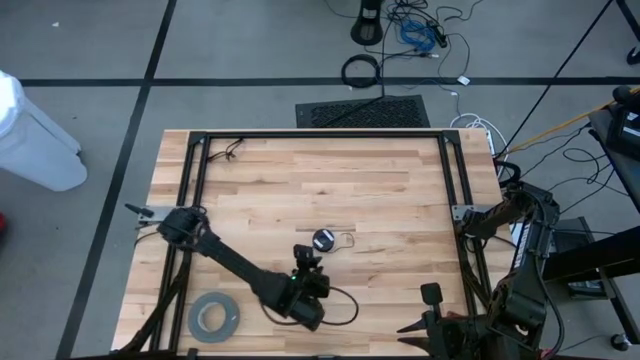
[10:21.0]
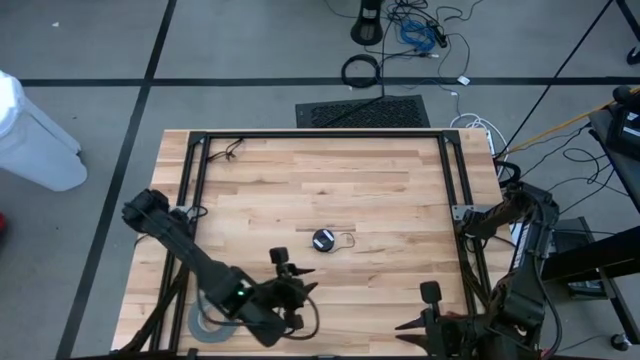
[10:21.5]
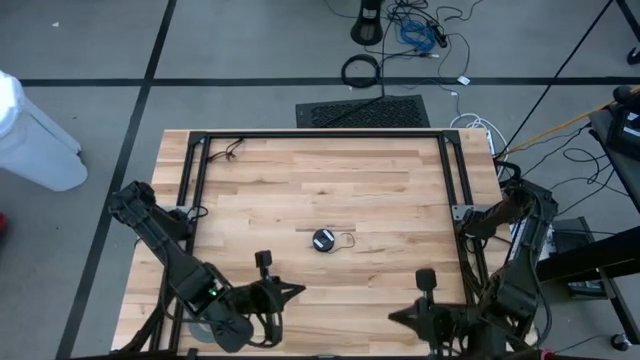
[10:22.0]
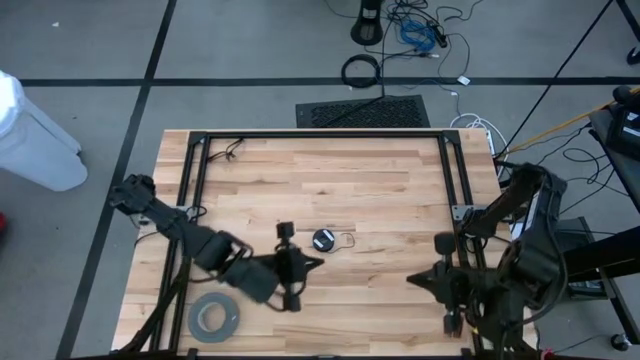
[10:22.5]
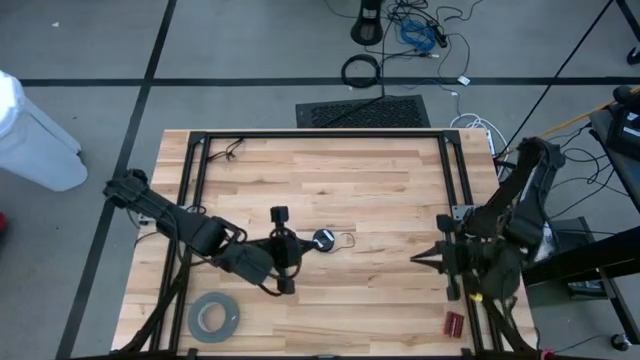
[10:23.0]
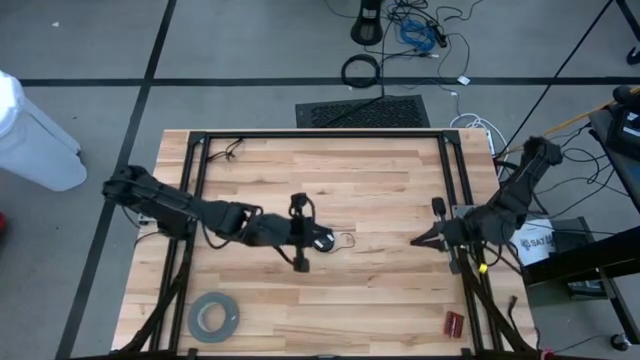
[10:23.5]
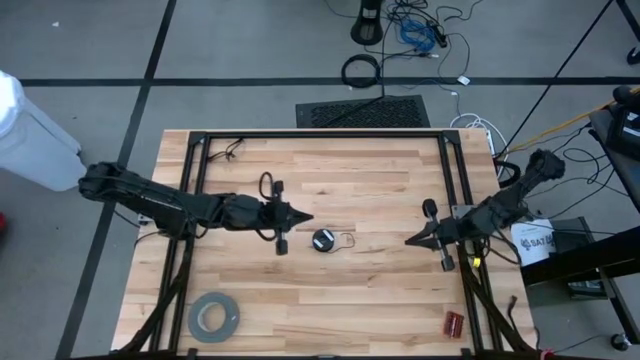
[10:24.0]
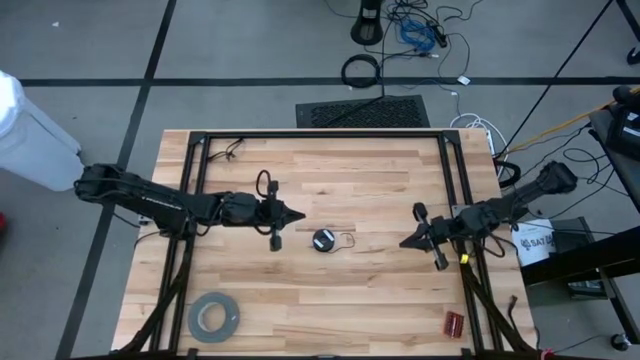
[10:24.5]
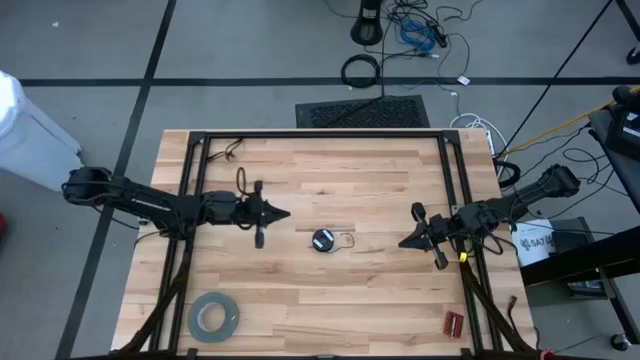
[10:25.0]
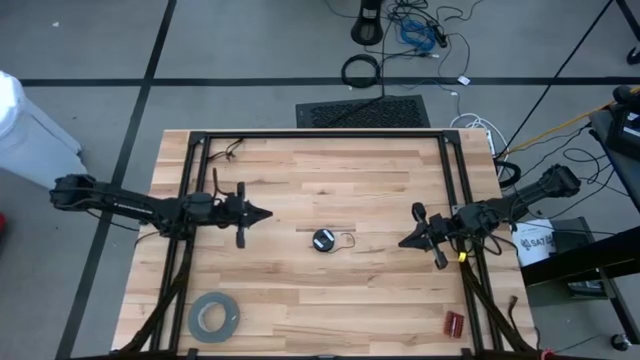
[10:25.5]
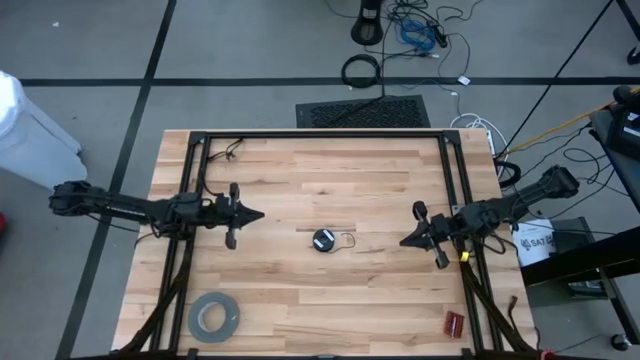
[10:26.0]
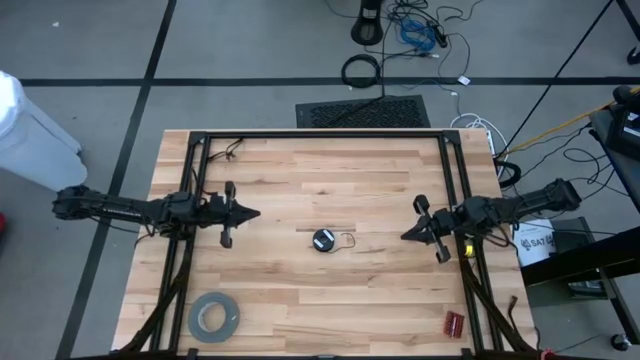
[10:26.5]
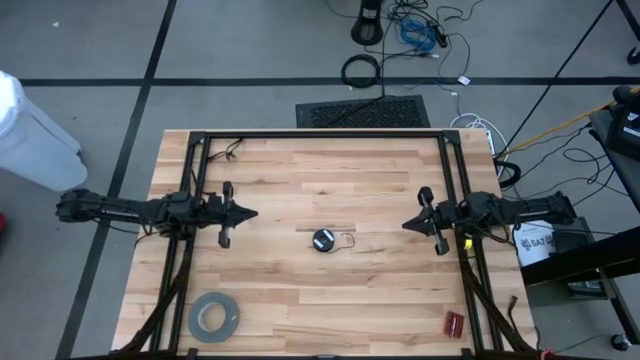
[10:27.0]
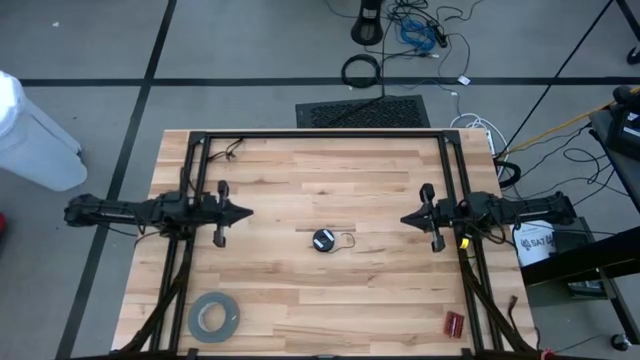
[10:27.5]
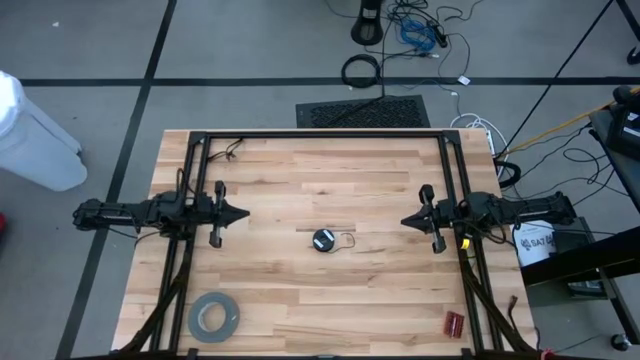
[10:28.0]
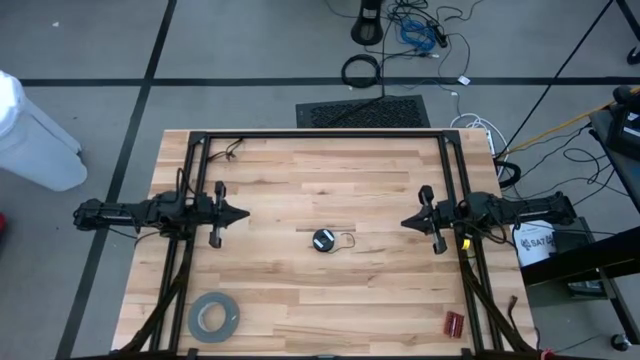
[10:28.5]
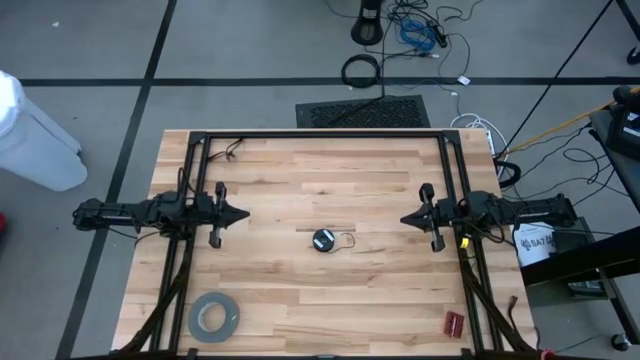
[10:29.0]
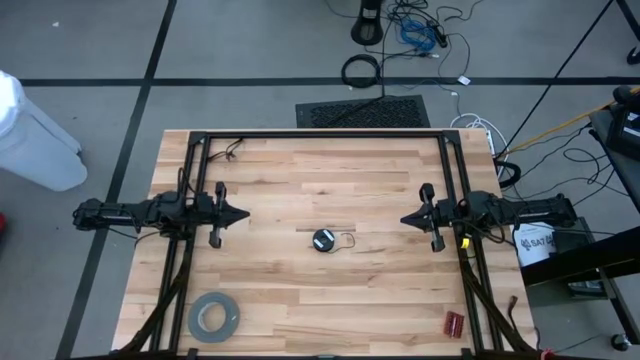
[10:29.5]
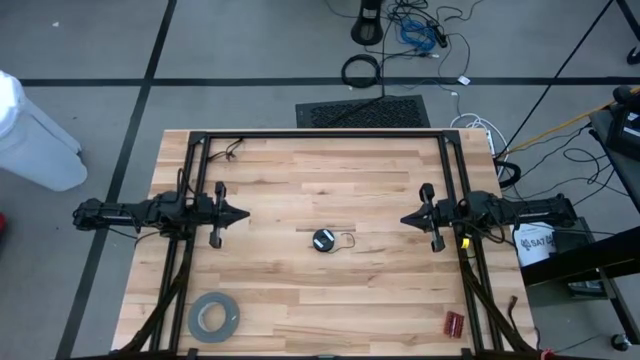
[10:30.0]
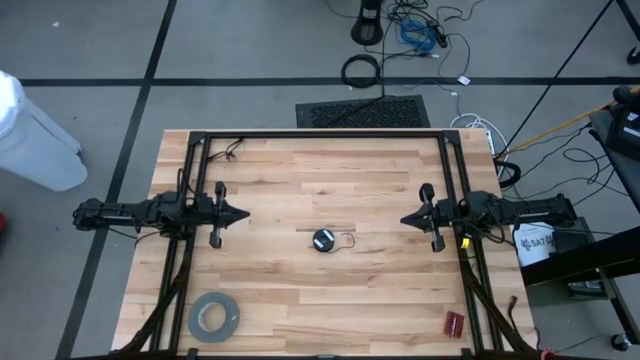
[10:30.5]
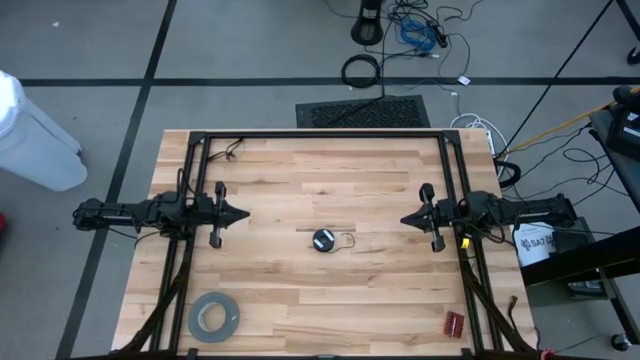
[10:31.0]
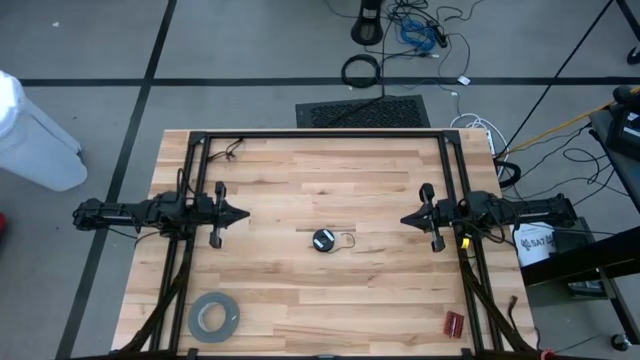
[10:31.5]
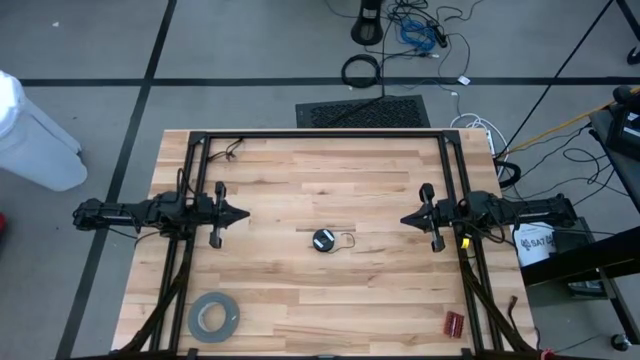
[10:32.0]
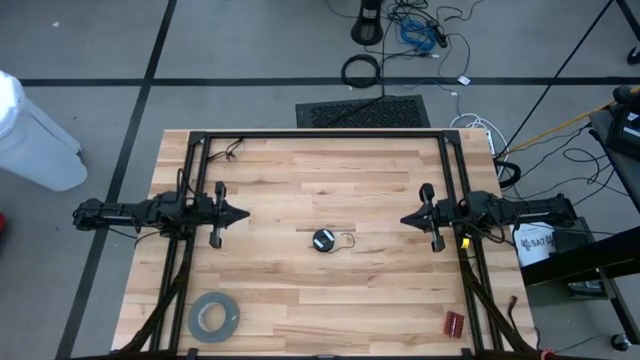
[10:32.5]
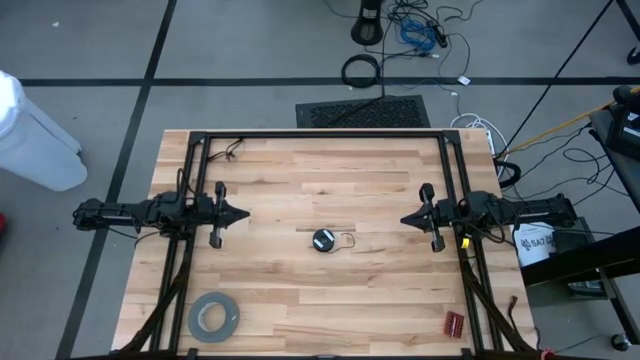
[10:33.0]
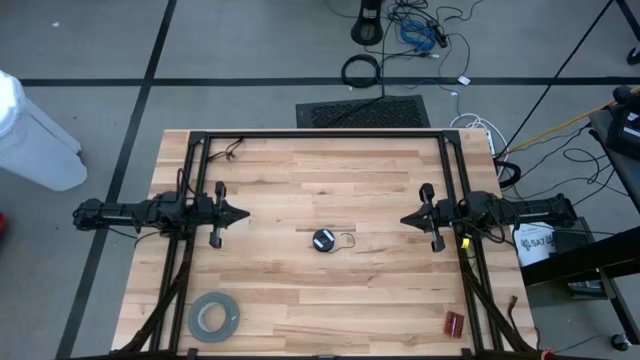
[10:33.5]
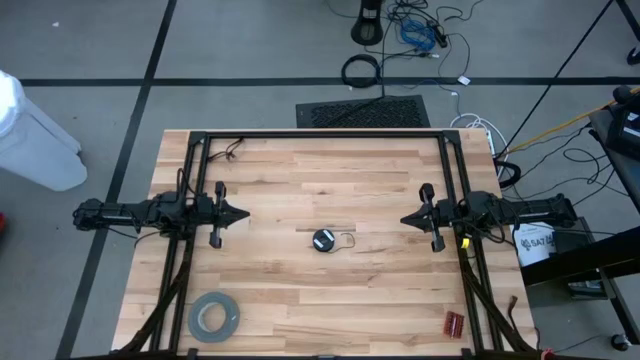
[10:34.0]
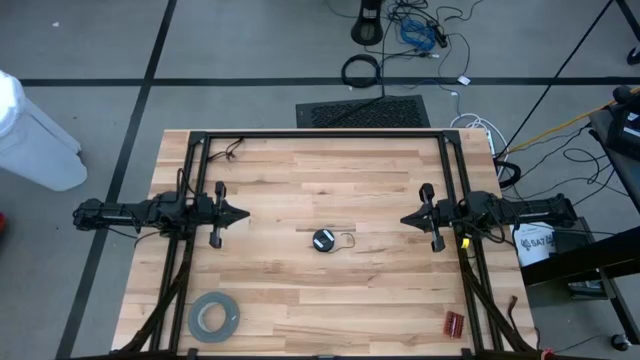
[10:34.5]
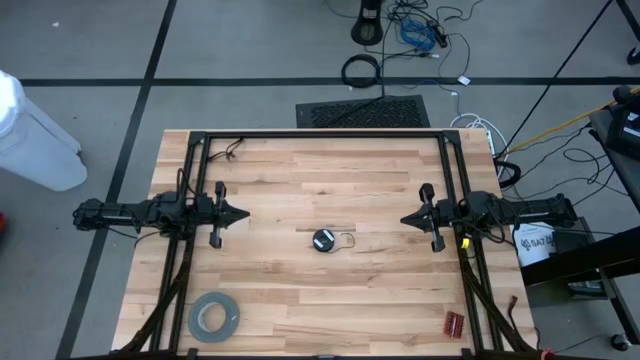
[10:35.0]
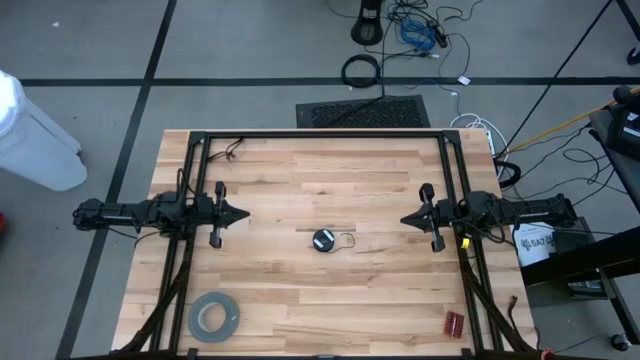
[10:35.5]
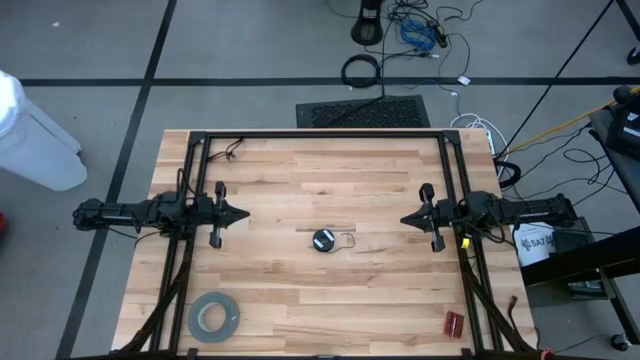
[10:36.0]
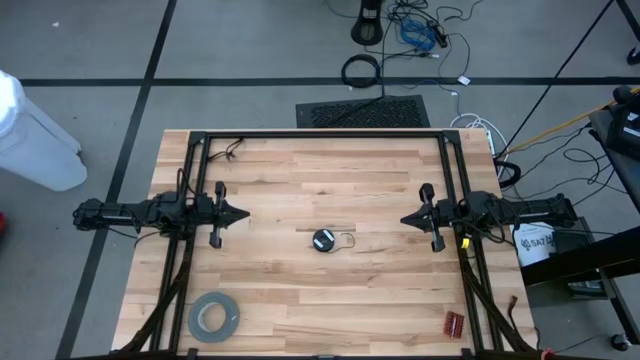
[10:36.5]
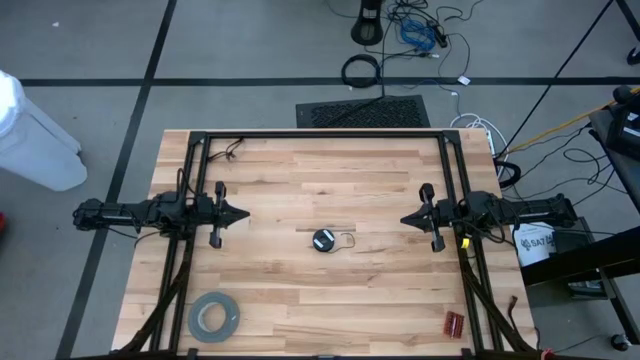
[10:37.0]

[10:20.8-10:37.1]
Task: Coil cords
Return to Home Position

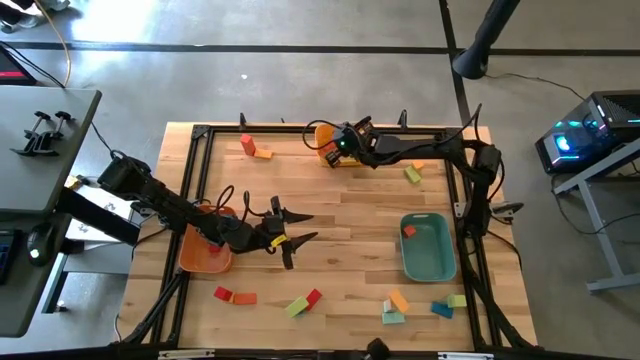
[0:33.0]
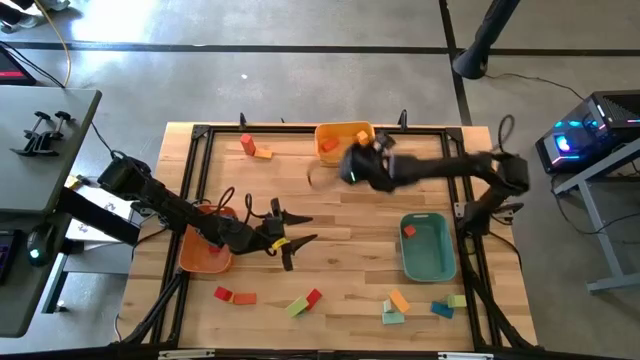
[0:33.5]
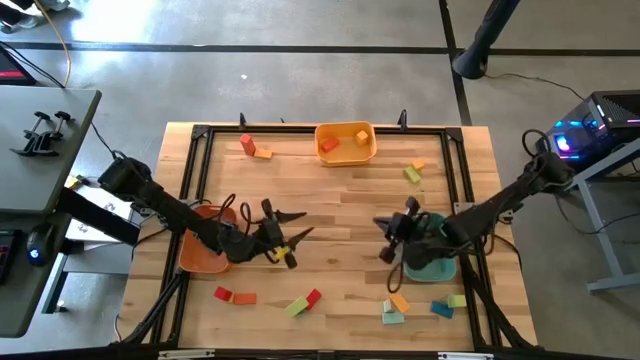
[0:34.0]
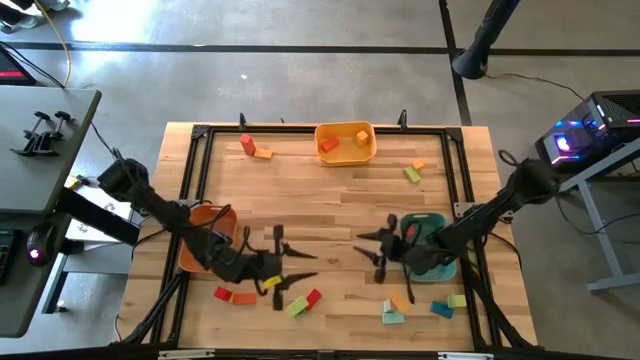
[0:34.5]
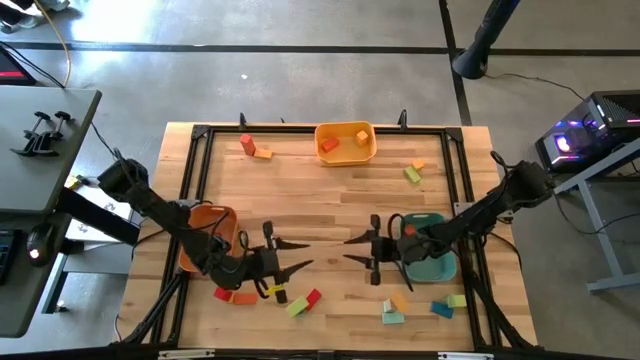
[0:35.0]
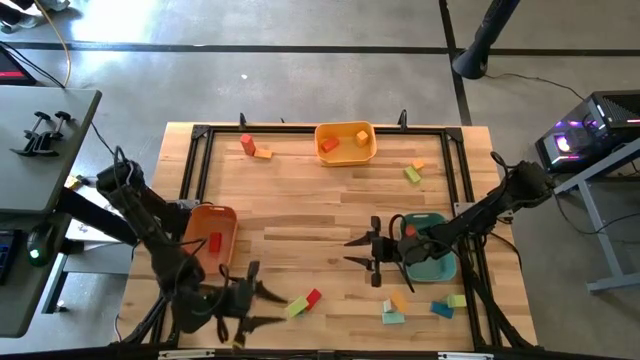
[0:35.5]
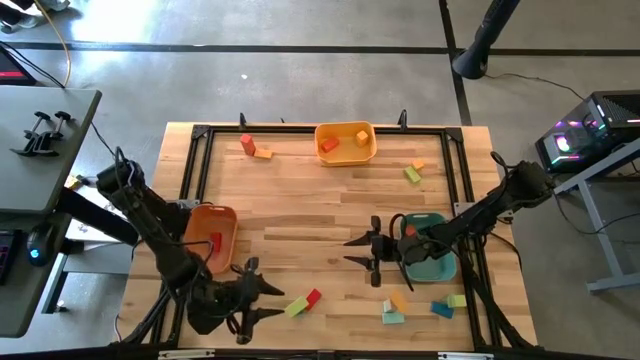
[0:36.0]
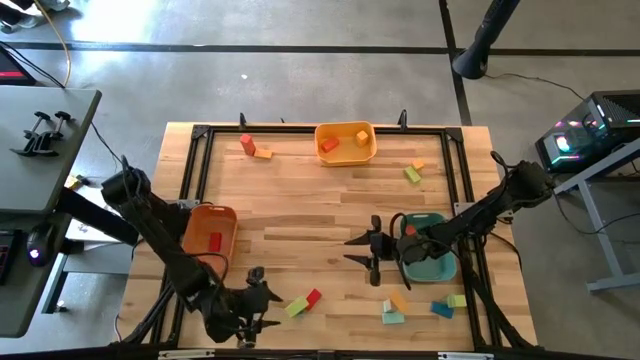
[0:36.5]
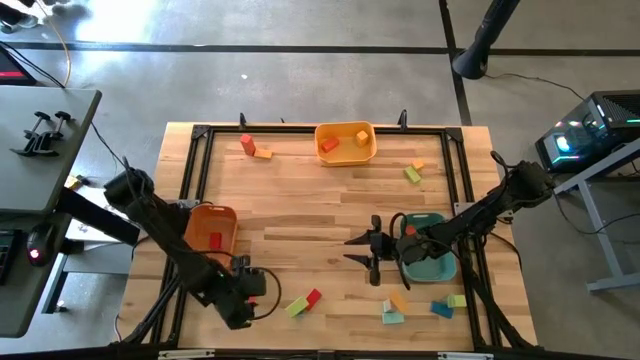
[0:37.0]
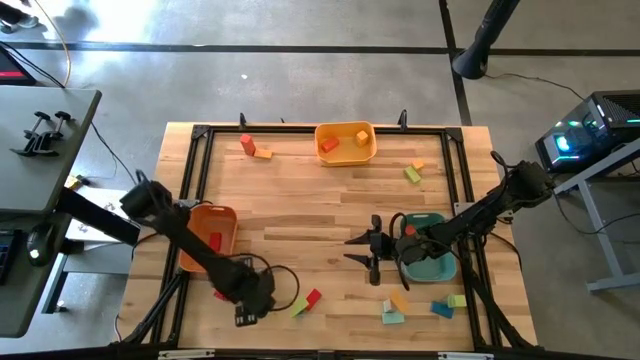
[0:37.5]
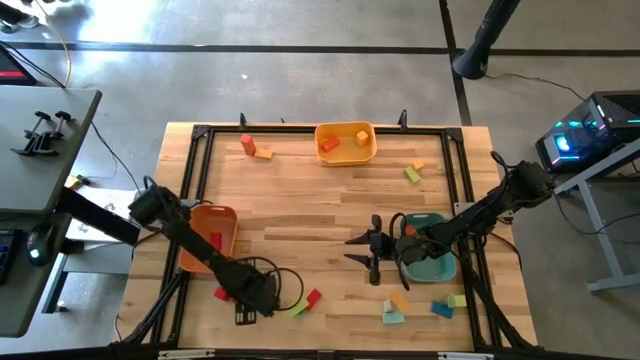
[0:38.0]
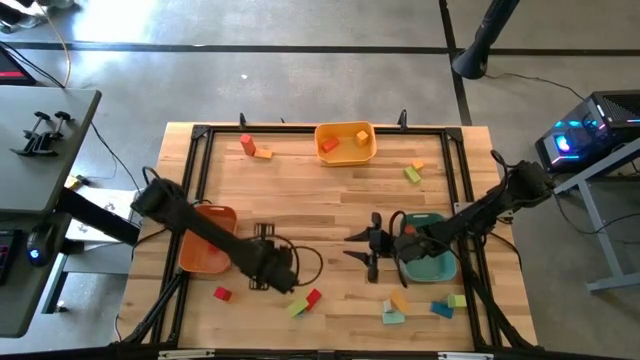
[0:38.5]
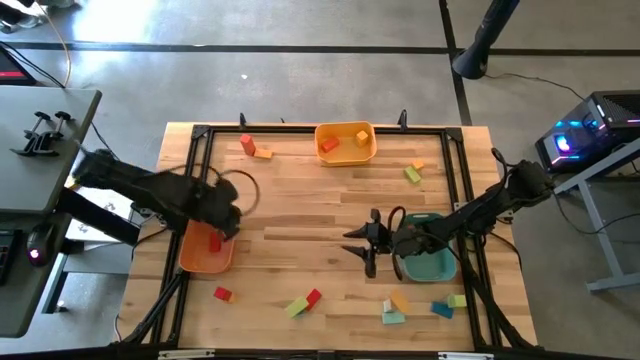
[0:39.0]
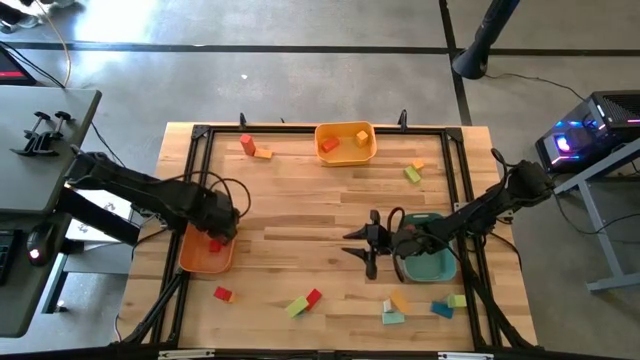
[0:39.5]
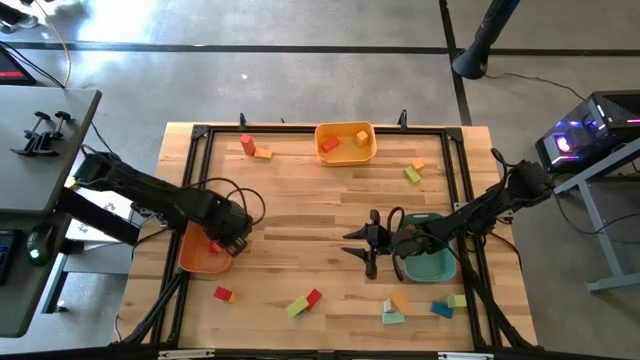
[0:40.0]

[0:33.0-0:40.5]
Task: Sort blocks by size
Put the orange medium block into the orange bin
